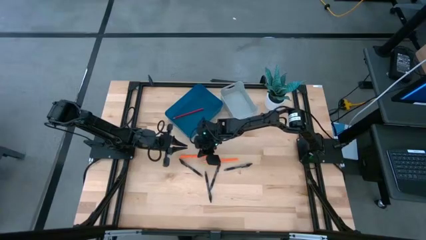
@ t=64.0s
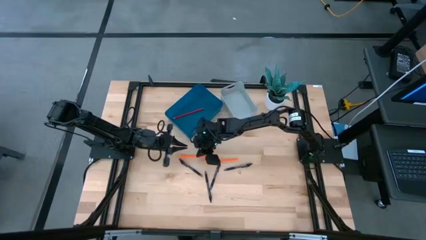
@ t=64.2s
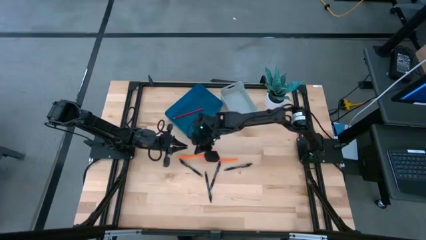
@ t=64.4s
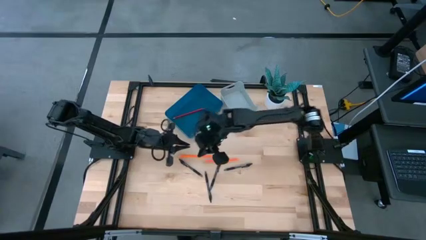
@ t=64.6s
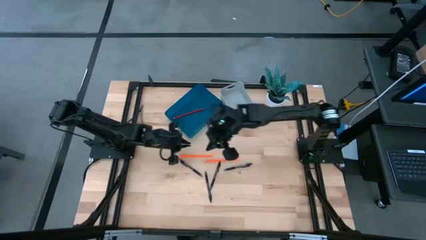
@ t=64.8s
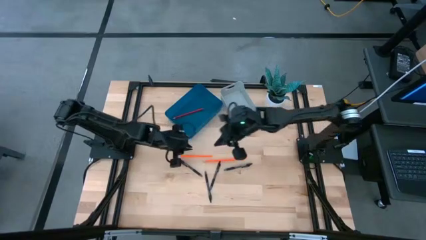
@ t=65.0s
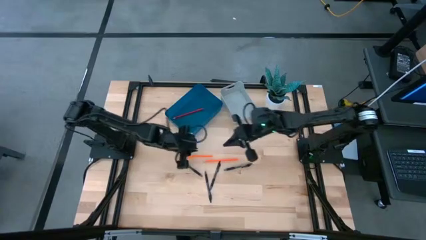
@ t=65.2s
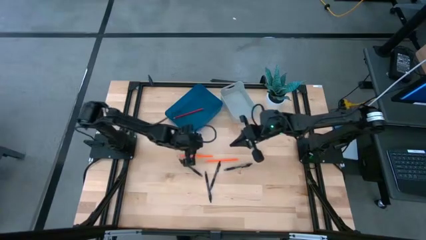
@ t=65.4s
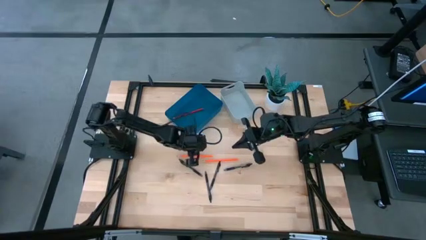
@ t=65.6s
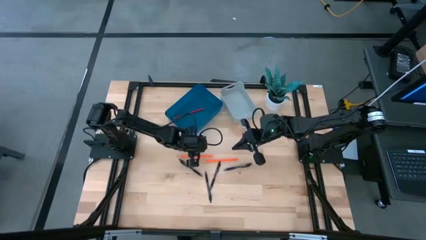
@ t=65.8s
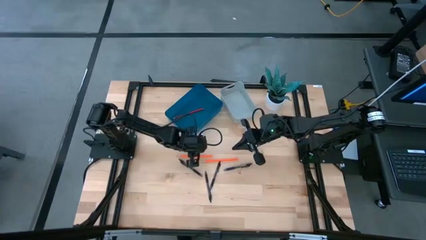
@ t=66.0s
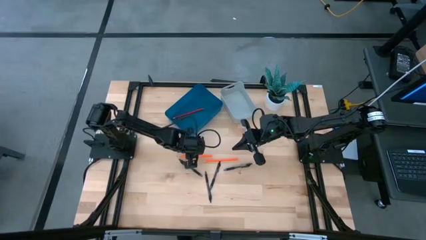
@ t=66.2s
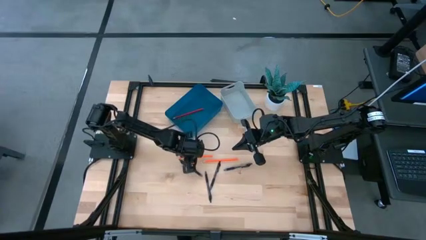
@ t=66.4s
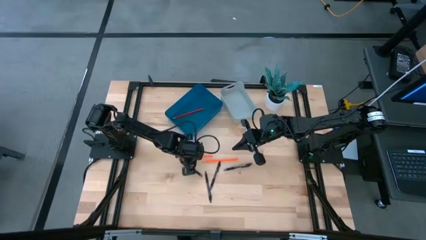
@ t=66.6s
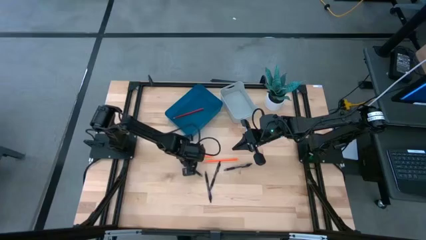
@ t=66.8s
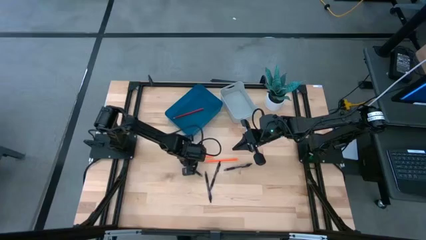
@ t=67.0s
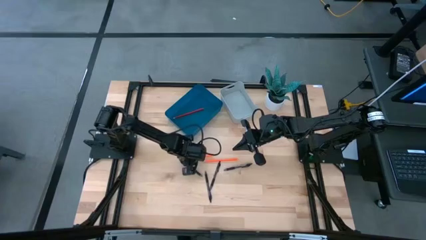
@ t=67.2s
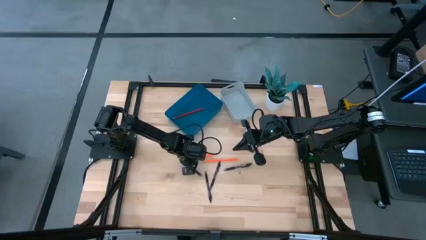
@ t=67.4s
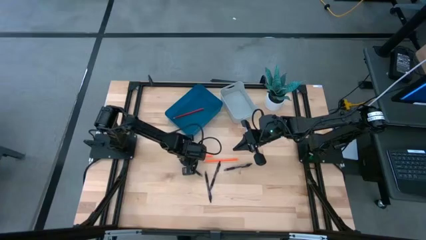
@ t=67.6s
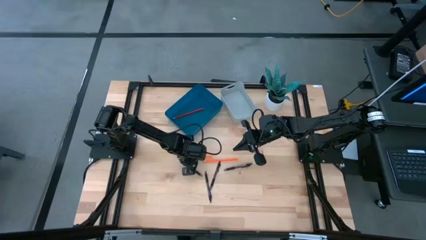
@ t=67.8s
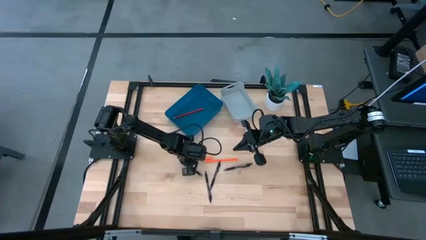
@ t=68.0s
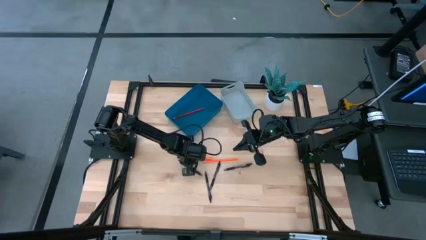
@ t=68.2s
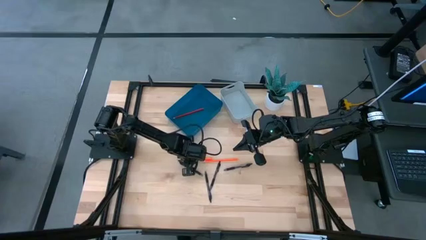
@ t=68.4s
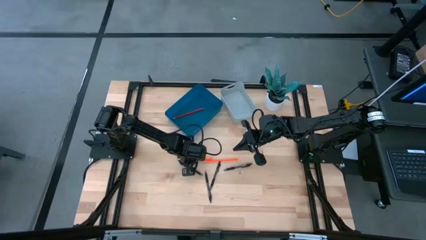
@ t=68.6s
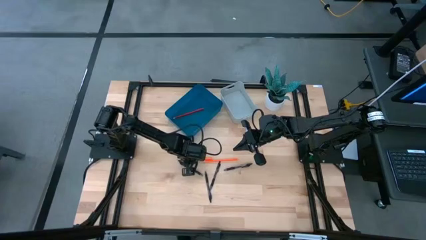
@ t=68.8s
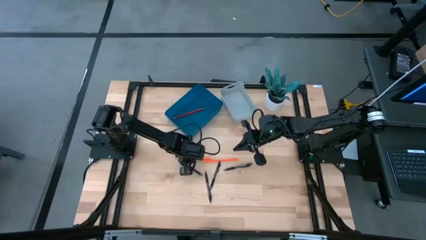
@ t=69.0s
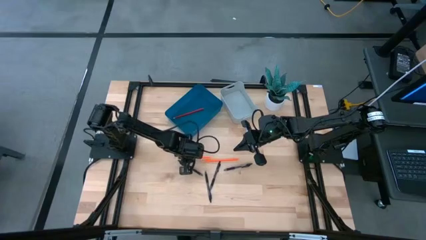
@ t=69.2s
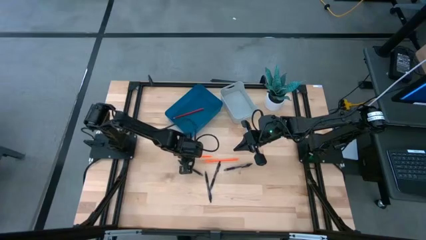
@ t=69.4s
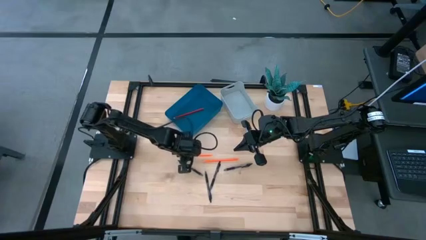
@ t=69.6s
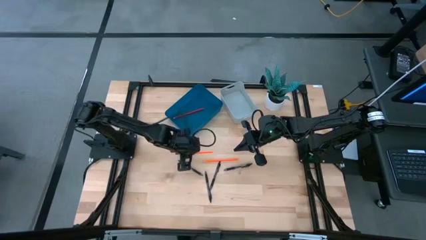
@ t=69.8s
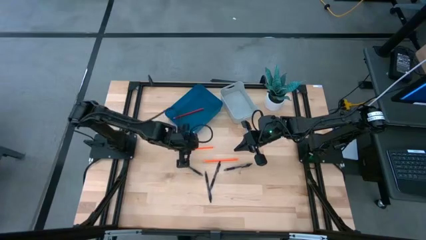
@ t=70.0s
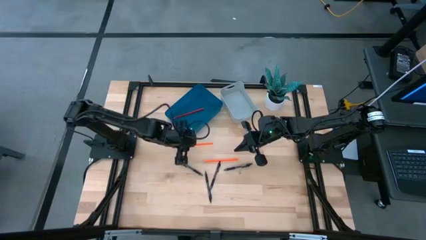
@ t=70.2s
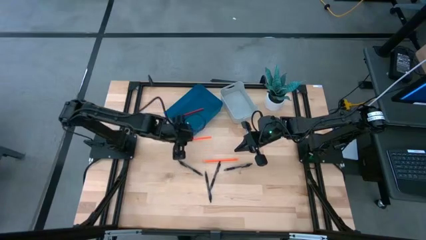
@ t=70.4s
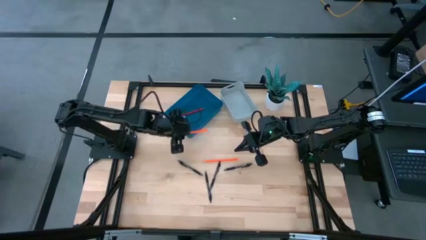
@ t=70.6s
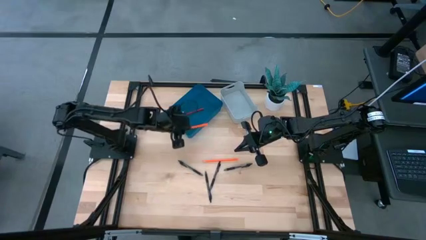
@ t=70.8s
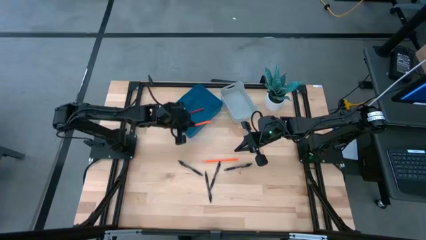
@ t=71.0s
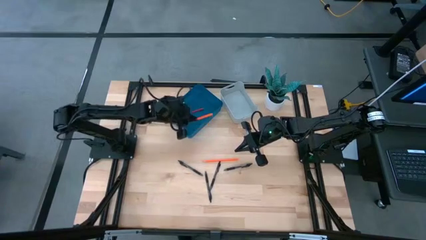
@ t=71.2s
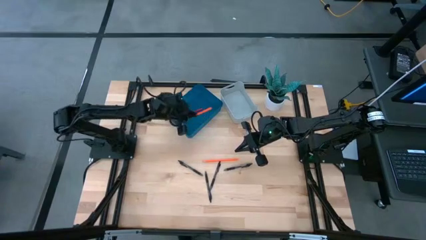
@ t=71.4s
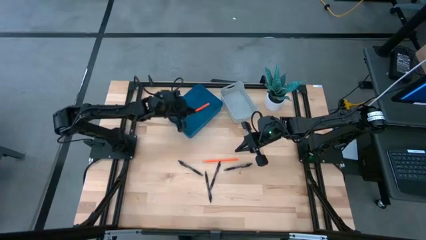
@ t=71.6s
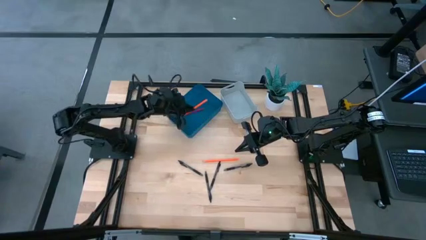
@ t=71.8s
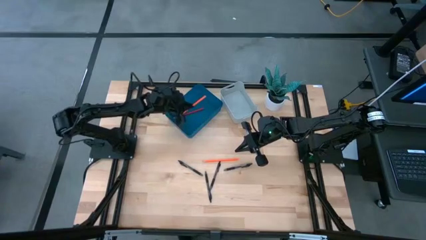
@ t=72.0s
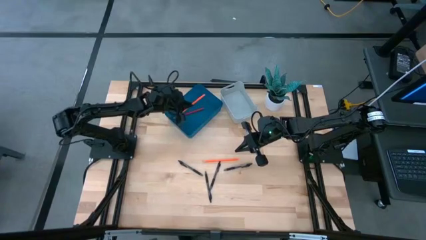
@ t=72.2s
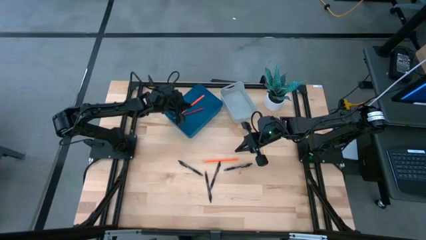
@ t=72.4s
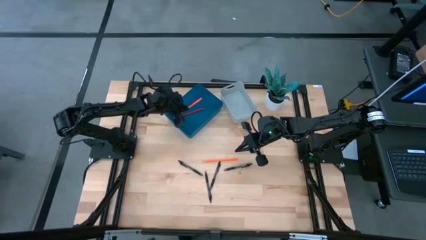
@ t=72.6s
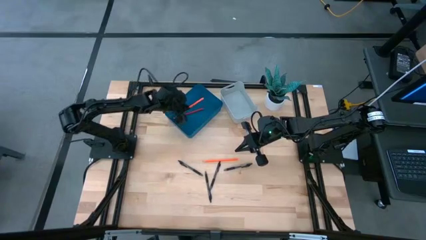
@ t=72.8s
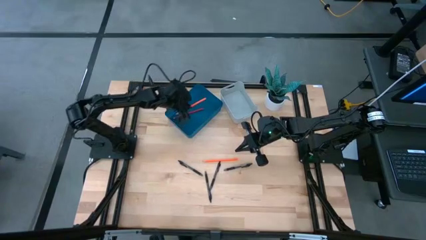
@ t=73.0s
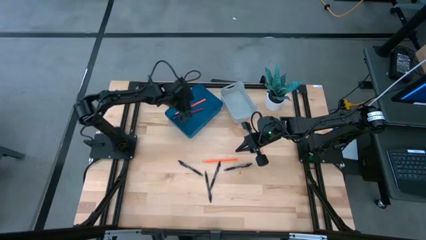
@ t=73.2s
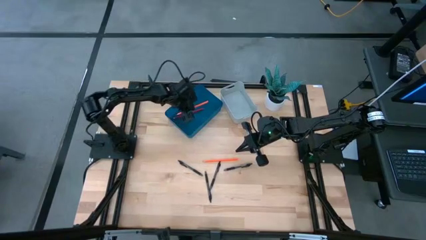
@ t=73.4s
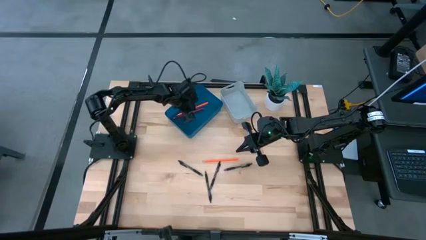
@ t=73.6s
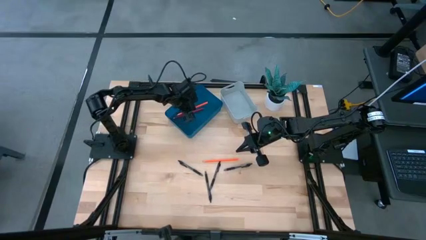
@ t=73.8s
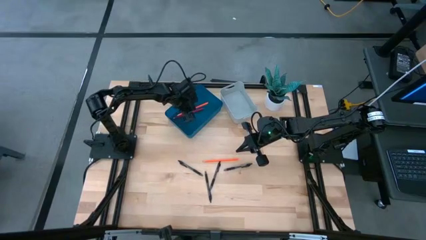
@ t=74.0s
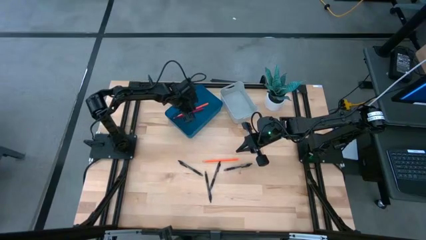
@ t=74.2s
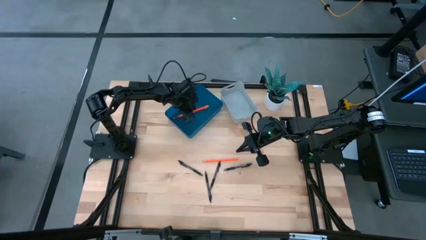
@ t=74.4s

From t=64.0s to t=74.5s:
Task: Sort pens & pencils
Put the orange pencil into the blue bin

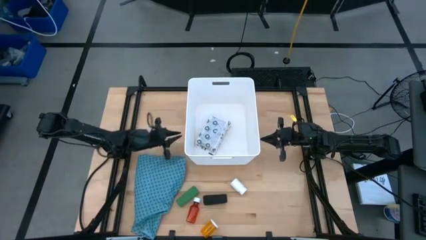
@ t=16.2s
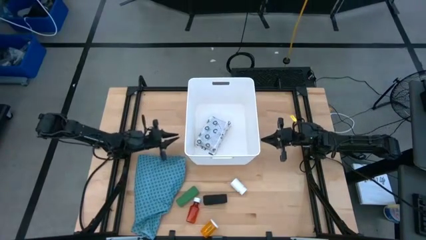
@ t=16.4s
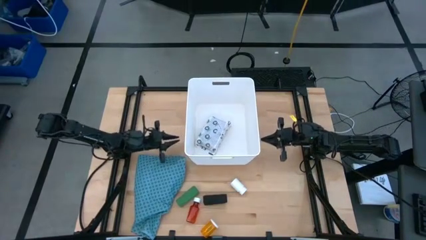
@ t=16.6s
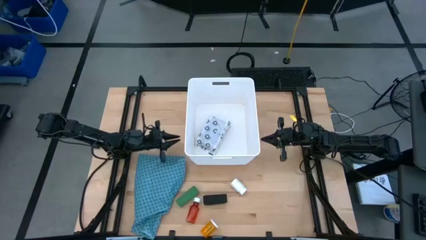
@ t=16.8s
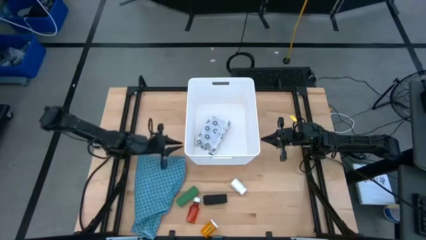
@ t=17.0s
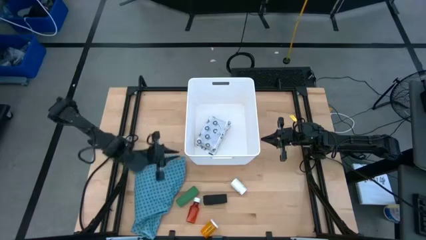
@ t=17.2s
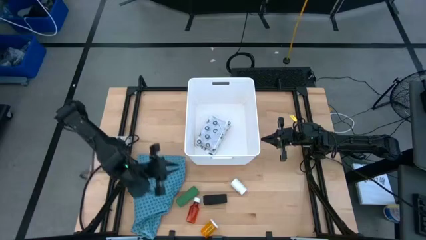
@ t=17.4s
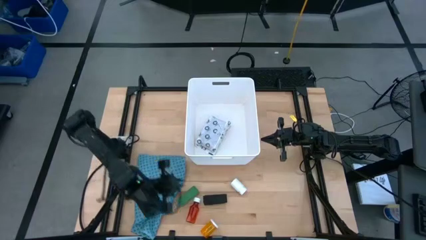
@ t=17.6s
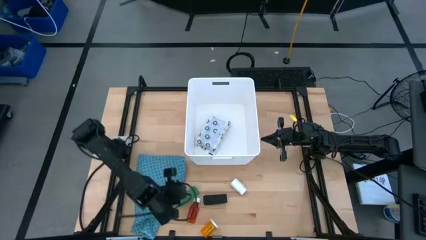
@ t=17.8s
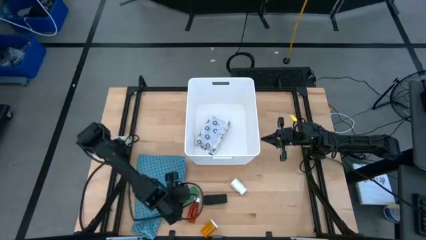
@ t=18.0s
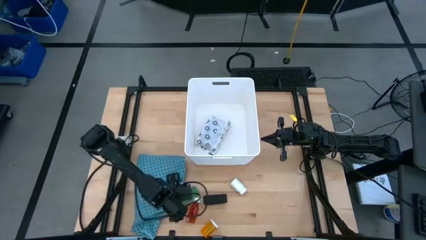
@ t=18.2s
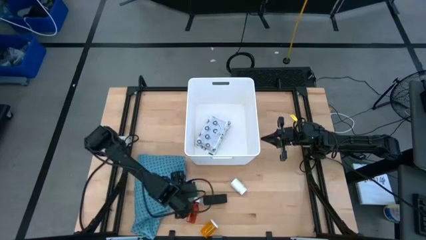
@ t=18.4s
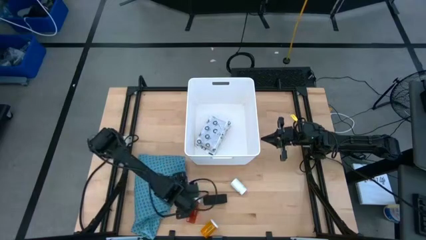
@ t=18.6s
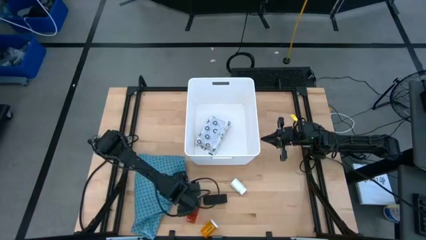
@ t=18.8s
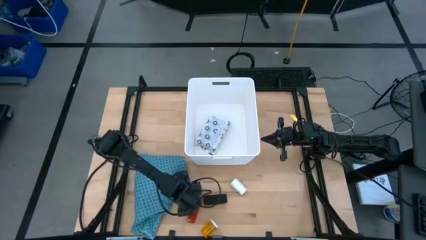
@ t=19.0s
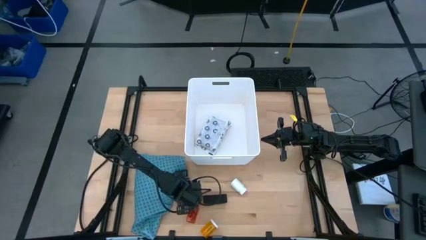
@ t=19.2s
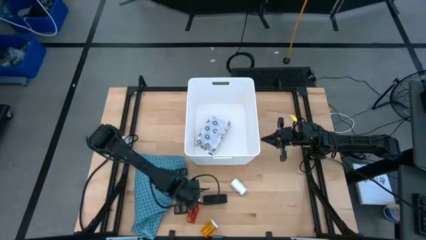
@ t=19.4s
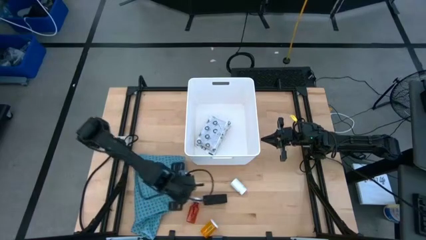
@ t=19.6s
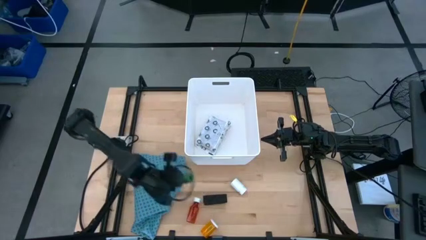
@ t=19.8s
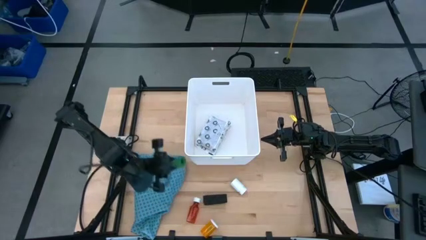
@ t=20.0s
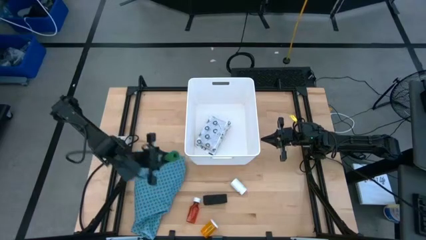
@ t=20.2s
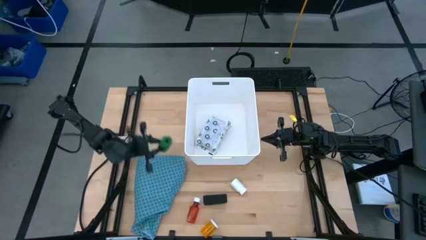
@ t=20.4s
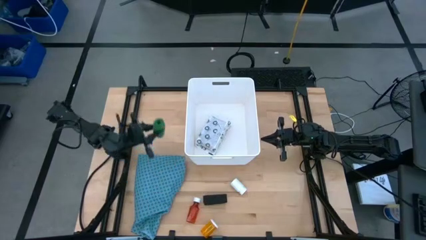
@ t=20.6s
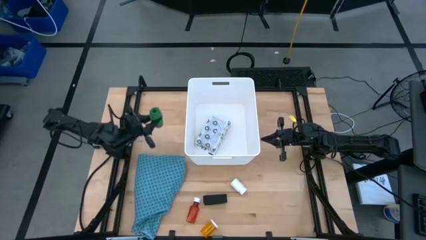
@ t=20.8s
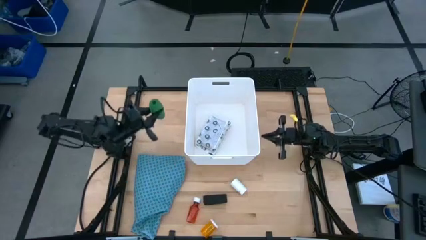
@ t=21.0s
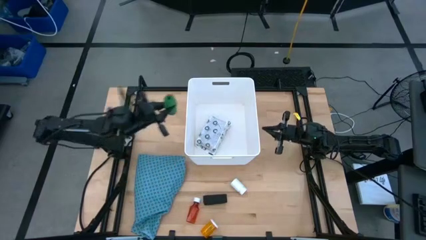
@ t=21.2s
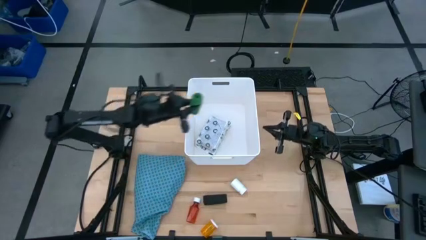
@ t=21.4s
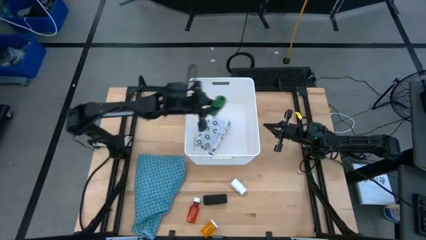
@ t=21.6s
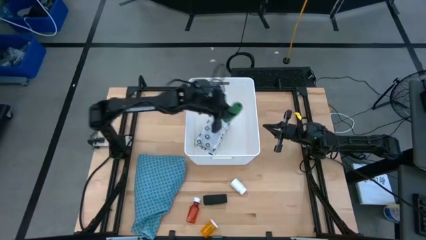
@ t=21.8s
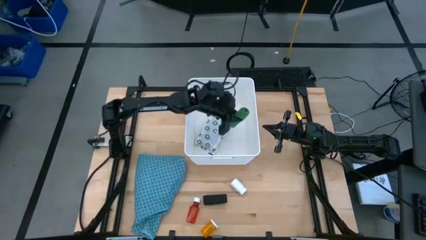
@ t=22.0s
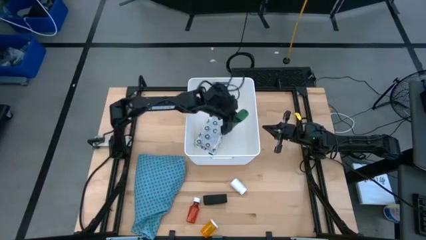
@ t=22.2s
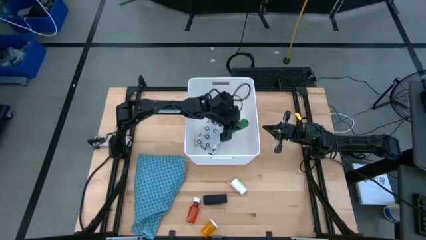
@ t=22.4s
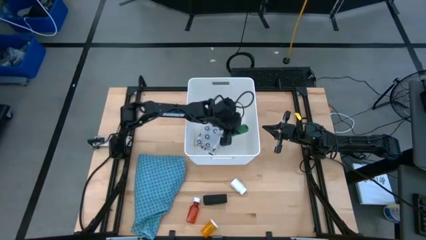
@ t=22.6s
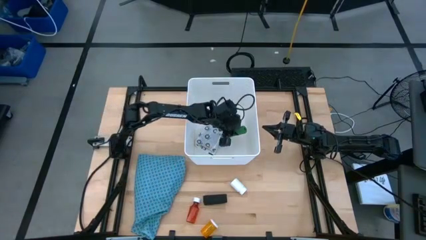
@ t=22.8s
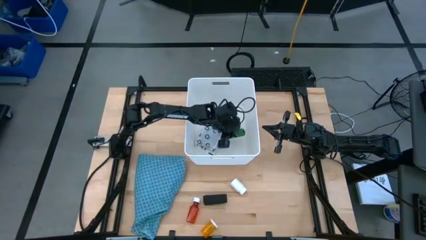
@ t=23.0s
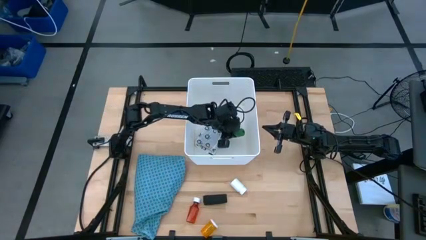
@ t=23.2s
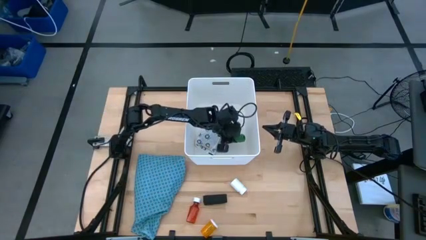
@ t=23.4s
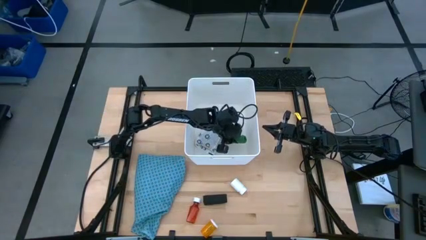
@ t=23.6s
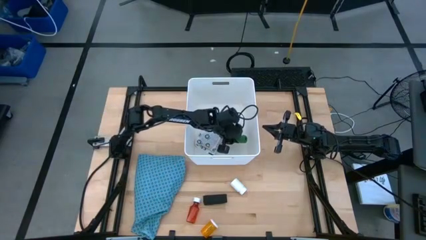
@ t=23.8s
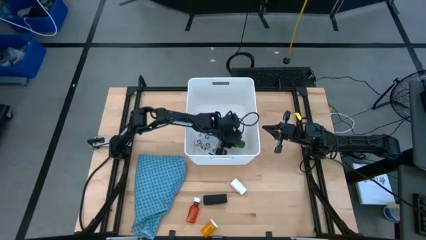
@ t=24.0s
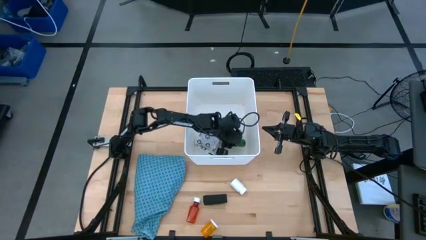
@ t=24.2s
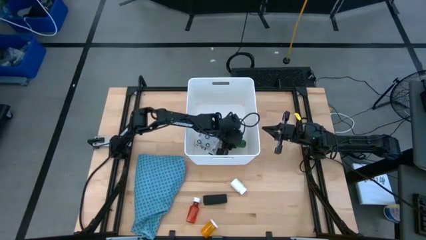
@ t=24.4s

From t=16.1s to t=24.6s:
Task: Pick & place medical supplies in basket/bin
Put the green bandage into the white bin
